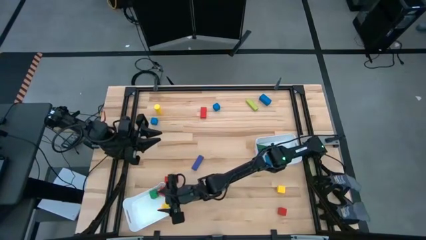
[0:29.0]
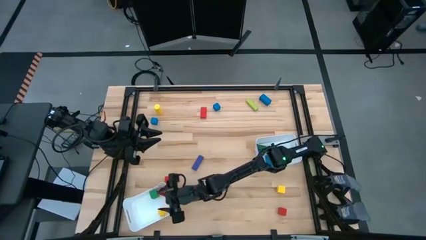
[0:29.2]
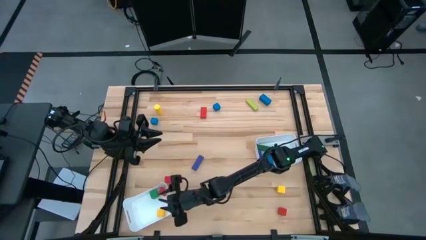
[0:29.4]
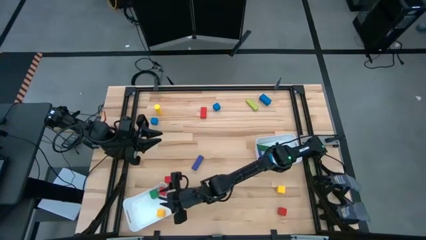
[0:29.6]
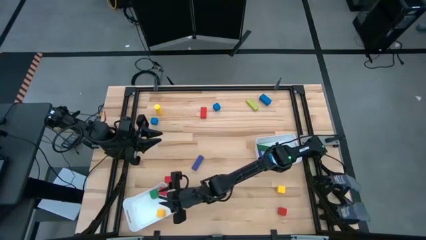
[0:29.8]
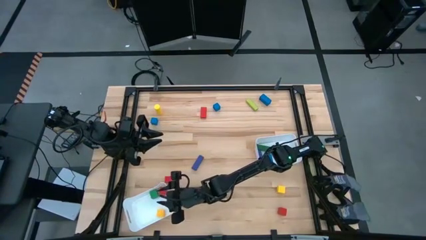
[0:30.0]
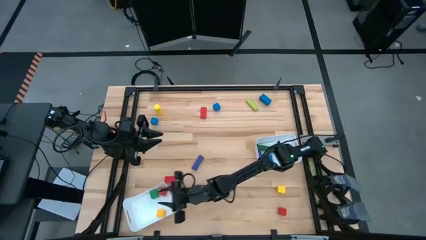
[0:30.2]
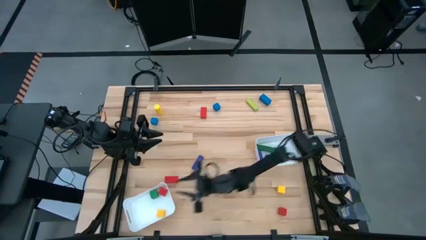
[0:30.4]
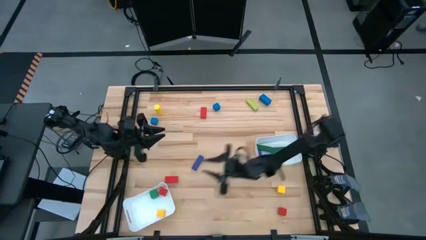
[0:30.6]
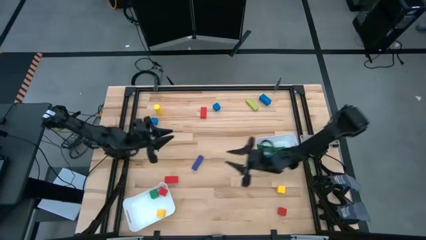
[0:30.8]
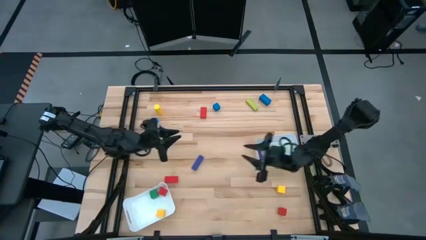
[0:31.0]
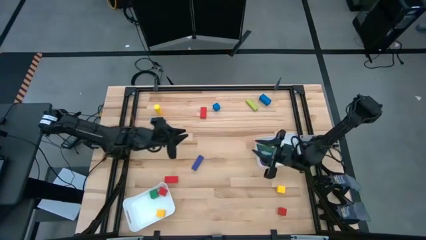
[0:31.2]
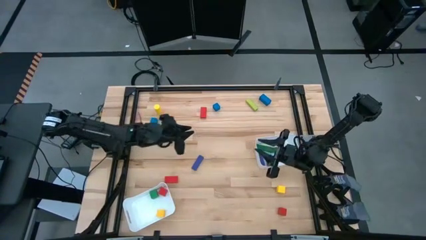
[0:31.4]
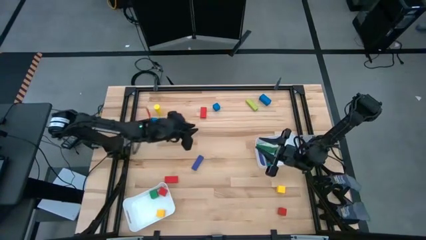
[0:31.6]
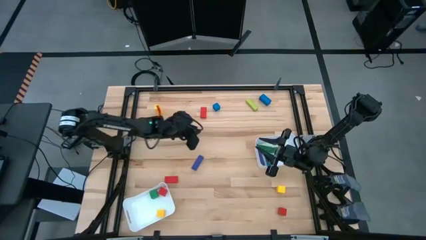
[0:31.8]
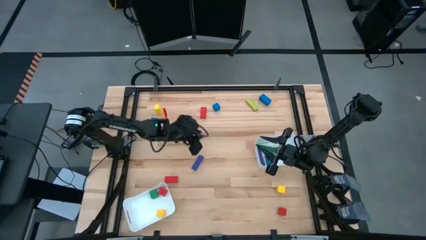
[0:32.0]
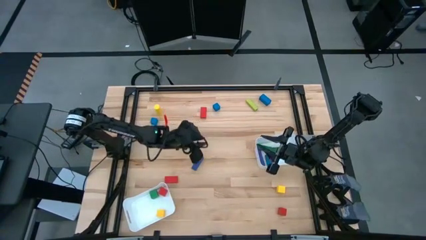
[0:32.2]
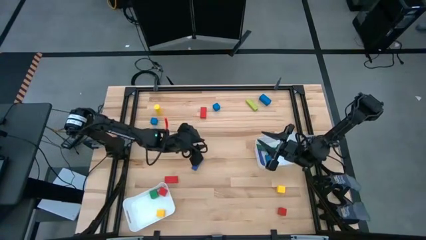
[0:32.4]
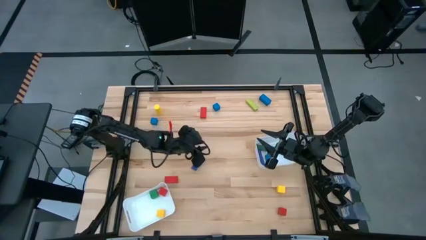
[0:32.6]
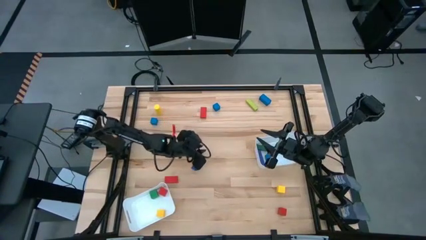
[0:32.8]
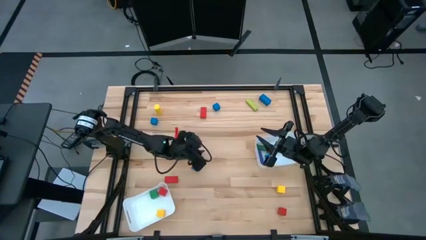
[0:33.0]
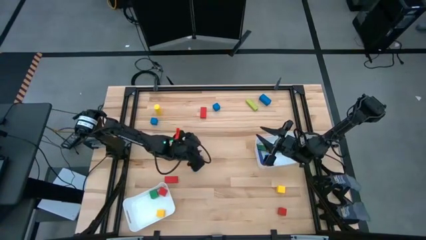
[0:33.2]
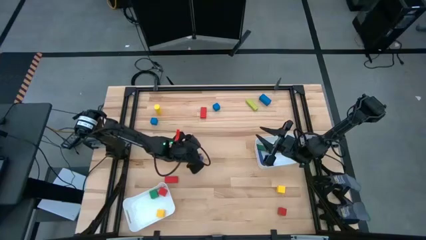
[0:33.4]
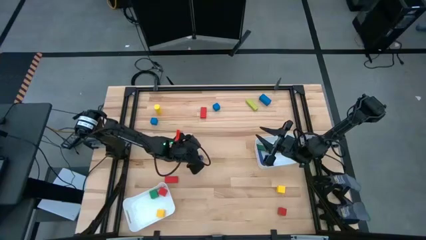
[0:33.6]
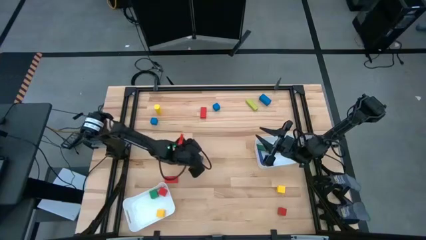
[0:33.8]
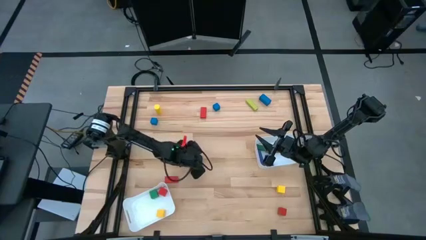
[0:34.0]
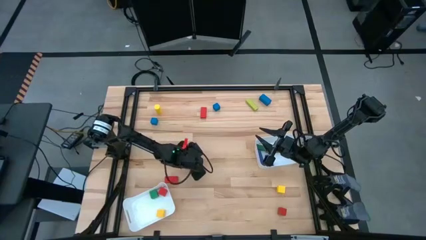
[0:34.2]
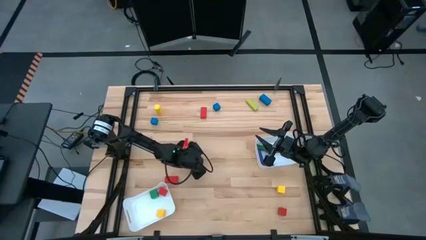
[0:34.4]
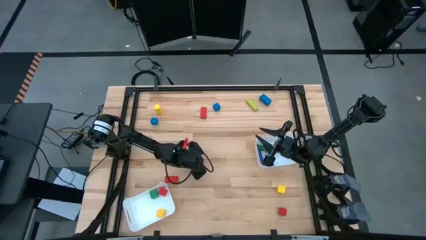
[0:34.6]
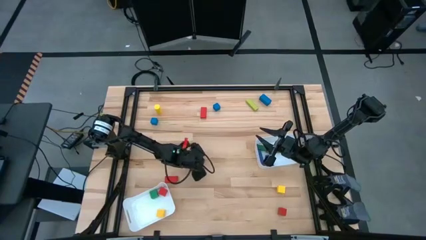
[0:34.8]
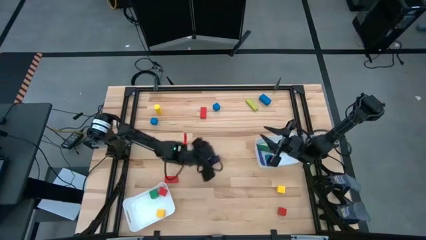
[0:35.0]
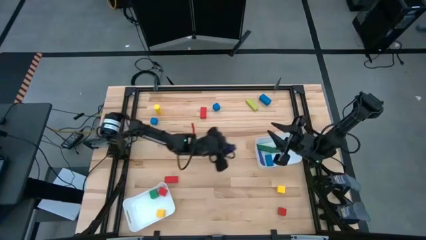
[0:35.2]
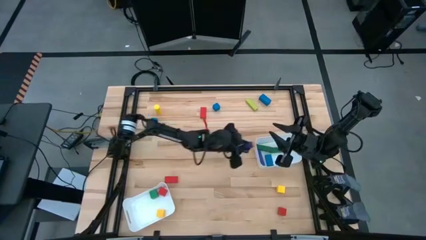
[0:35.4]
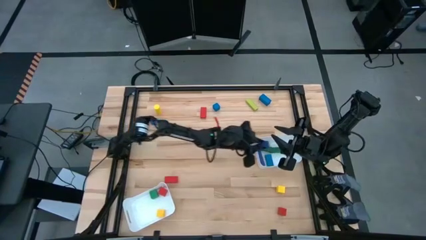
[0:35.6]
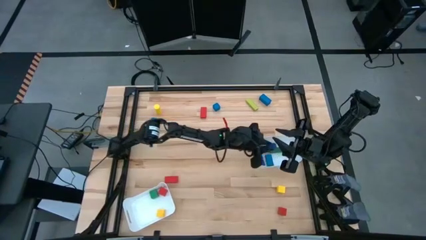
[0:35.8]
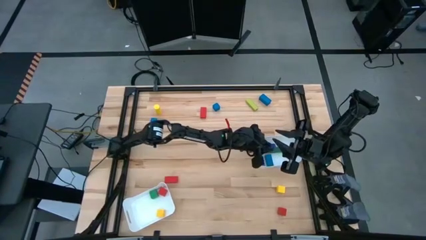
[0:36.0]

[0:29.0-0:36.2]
Task: Sort blocks by size
Put the blue rectangular block into the top white bin

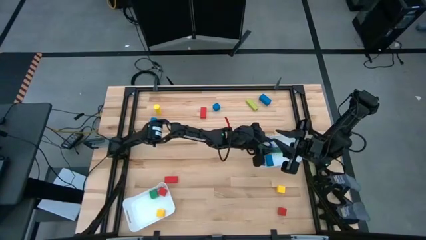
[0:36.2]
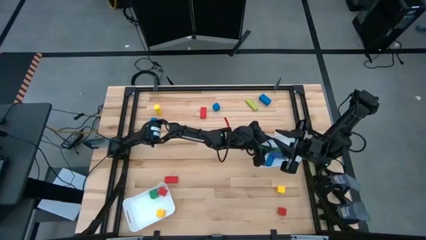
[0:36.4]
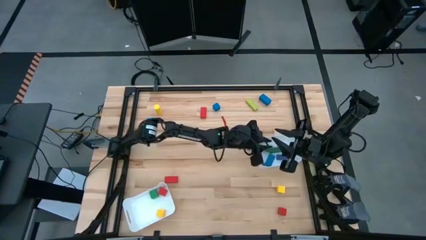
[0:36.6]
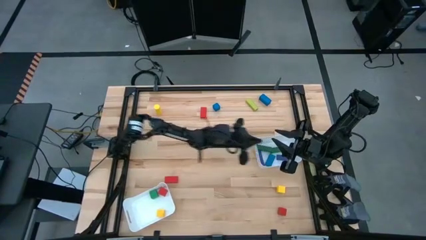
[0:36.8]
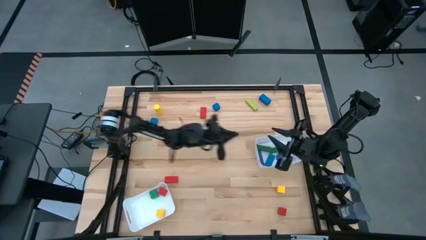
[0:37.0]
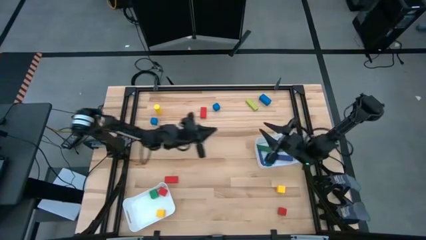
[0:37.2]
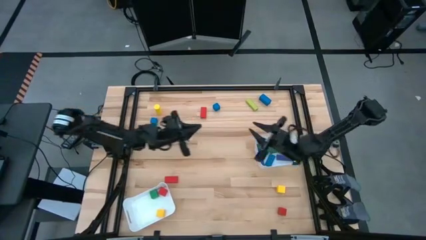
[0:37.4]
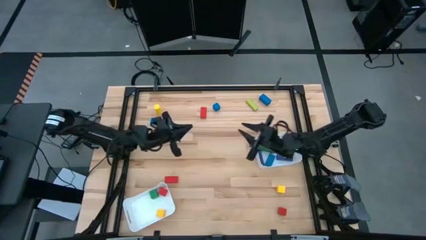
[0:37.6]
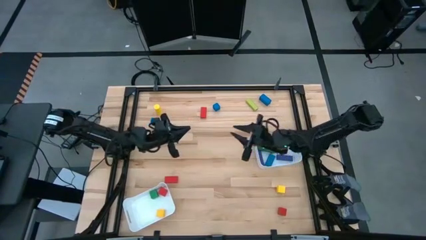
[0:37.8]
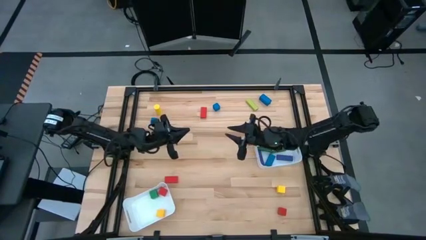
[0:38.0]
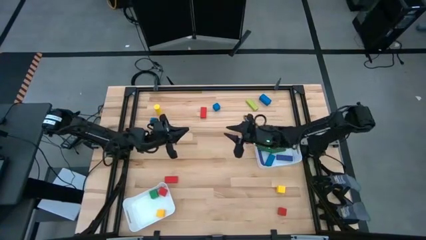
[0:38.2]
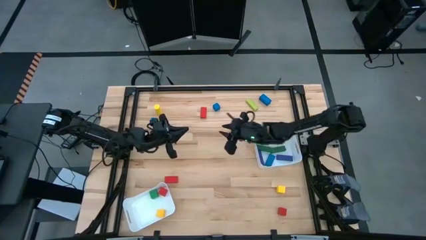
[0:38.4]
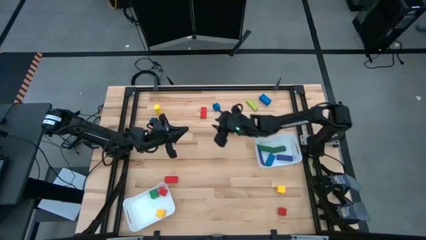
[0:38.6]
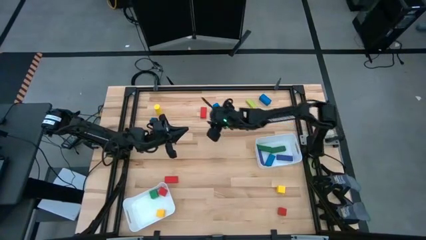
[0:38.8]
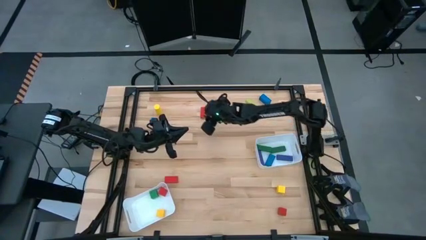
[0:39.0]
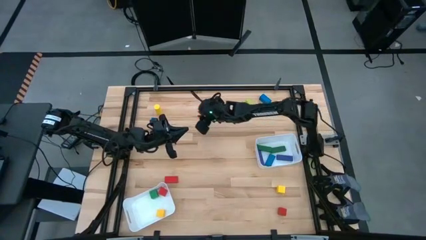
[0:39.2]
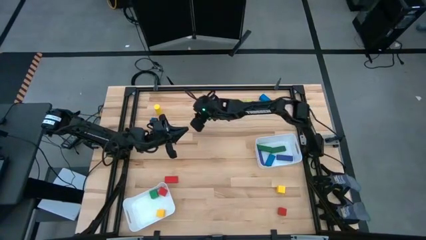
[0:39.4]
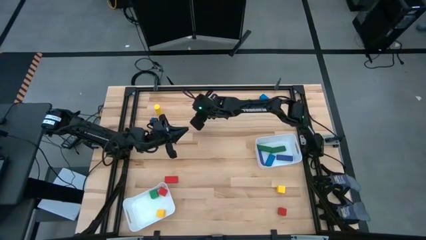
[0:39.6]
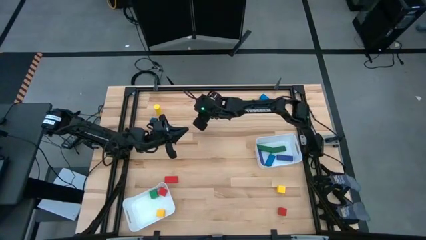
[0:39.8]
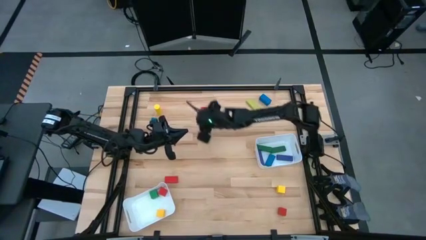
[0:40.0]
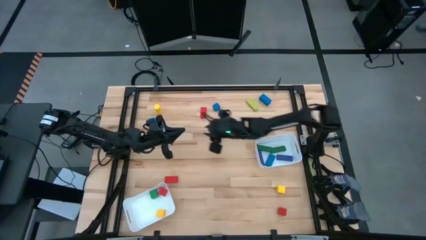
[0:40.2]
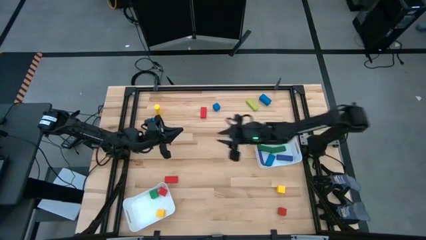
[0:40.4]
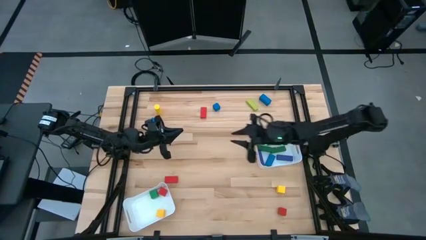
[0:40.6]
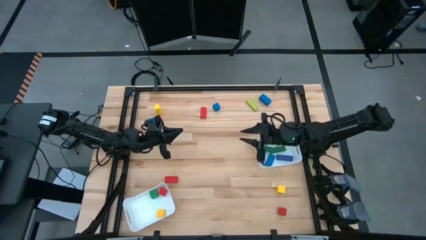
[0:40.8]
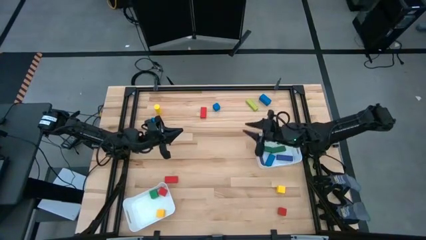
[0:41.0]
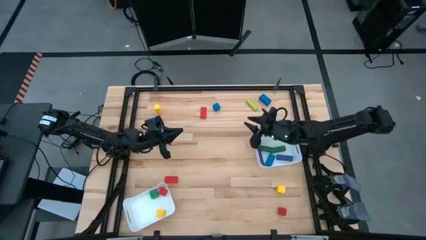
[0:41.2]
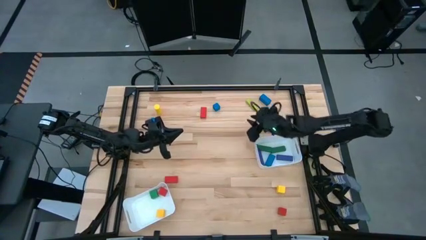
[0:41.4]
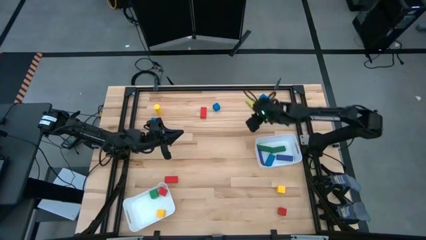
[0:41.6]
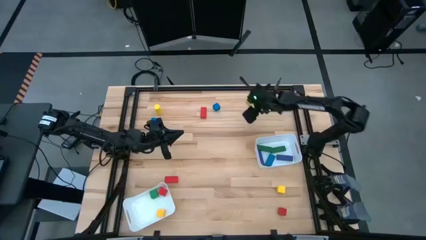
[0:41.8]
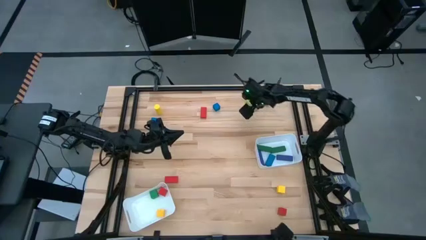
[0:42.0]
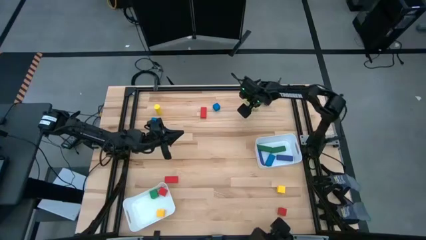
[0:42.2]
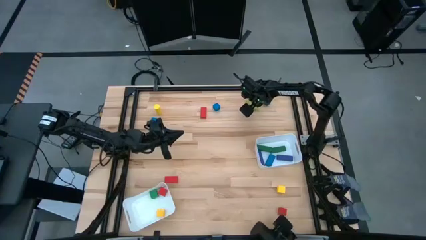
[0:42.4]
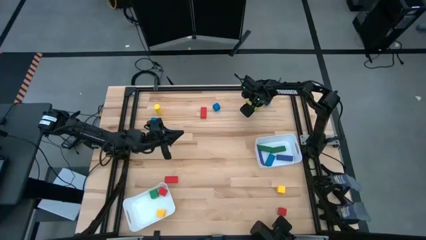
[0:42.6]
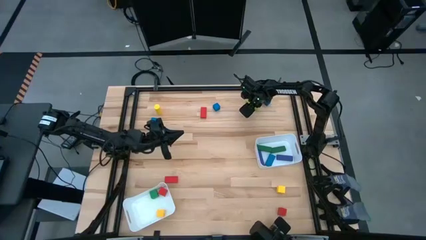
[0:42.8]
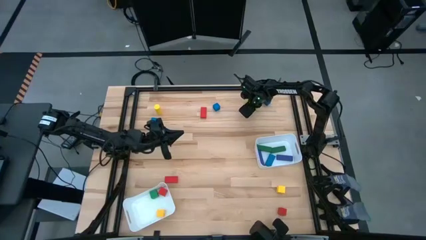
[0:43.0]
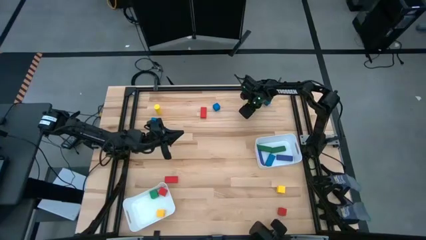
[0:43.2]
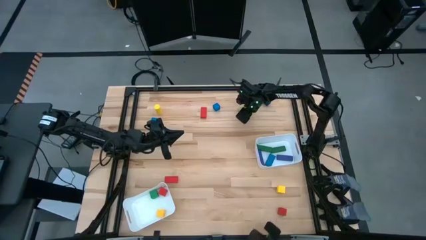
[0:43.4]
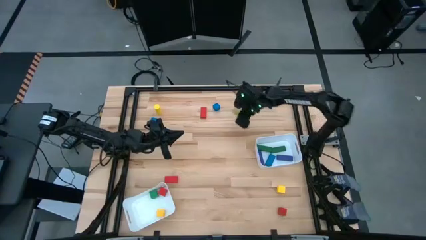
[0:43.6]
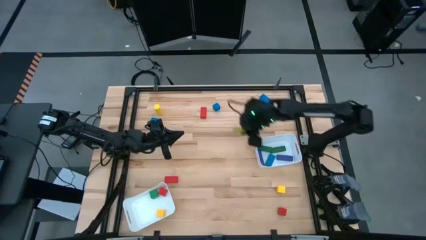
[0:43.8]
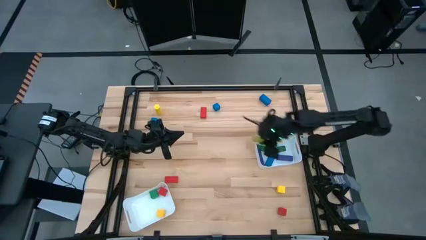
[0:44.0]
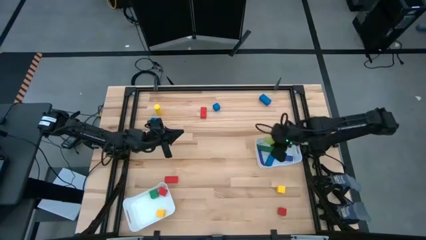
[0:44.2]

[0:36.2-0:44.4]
Put the light green rectangular block into the top white bin

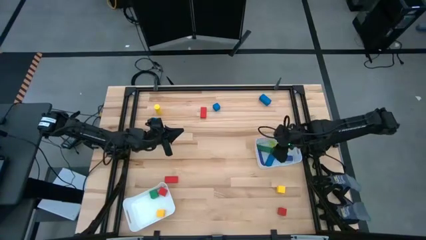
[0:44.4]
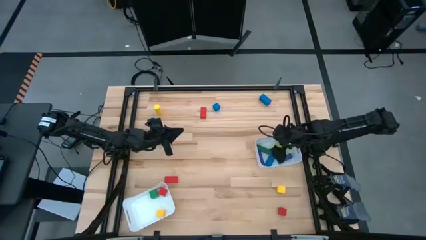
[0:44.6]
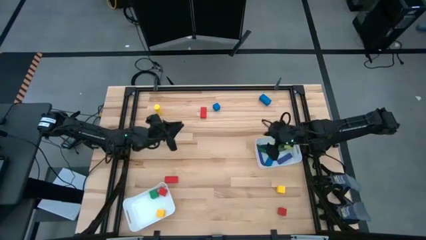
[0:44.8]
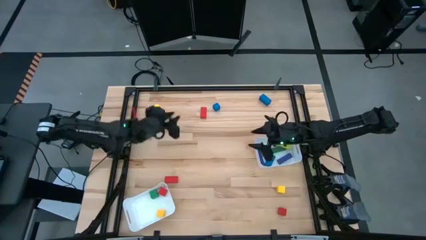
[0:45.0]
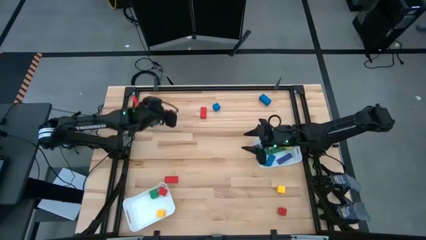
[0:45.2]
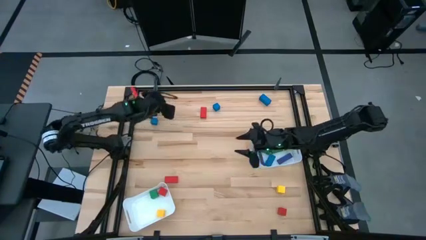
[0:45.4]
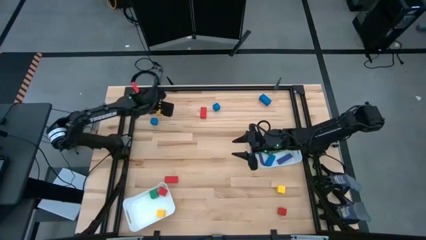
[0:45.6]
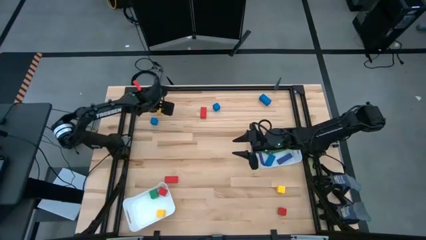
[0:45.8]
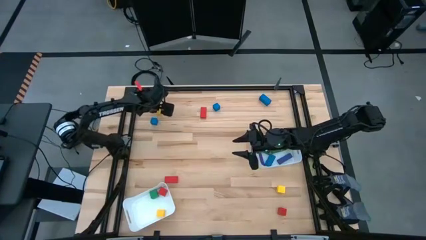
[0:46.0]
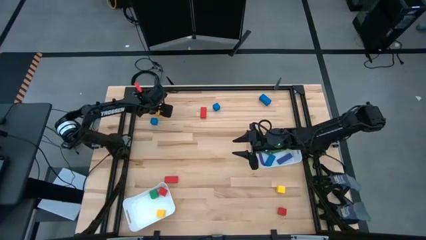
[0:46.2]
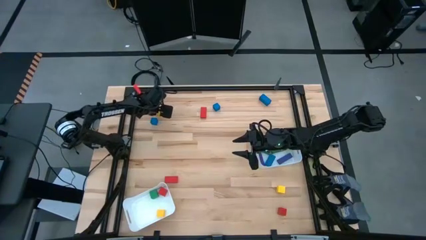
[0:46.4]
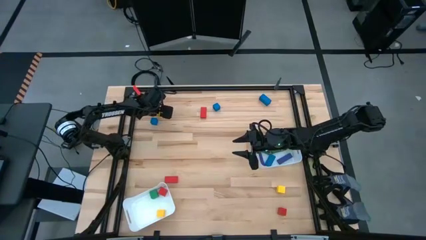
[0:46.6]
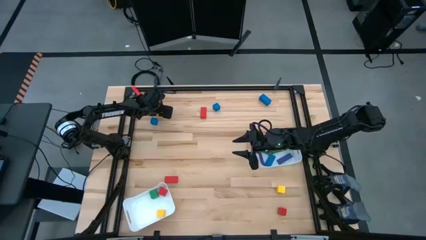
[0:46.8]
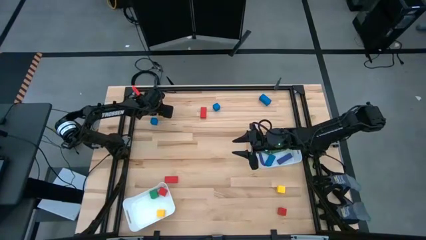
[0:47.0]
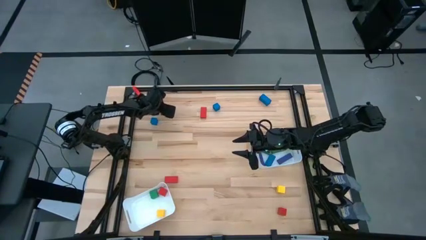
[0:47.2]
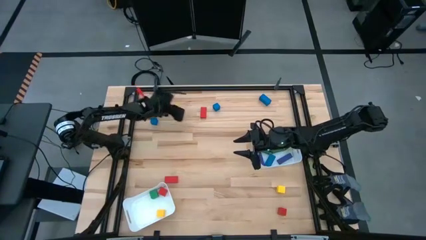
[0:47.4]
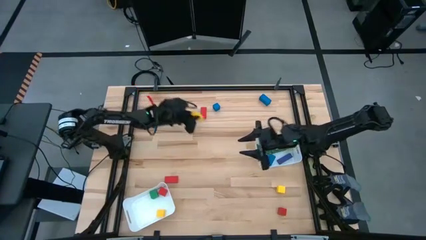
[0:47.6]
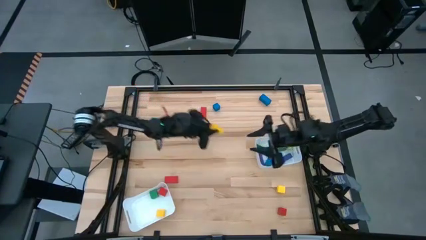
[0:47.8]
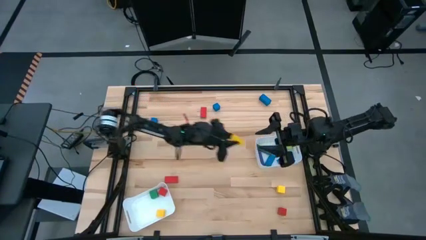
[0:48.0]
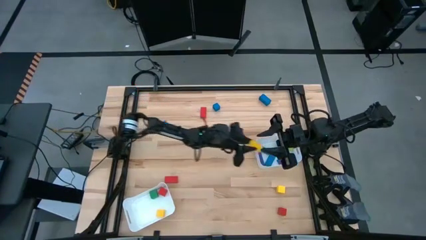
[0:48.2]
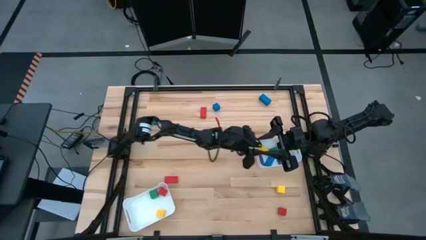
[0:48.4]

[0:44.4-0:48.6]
Put the yellow cylindrical block into the top white bin
